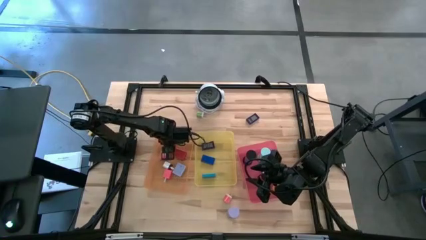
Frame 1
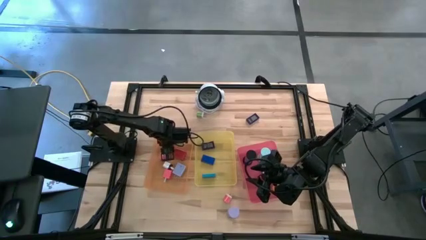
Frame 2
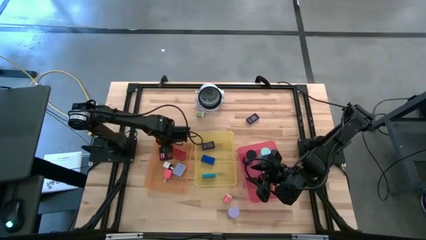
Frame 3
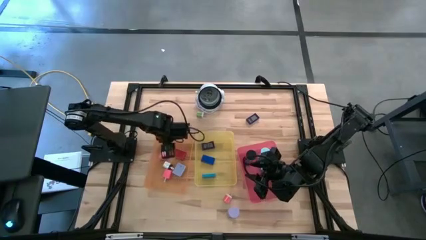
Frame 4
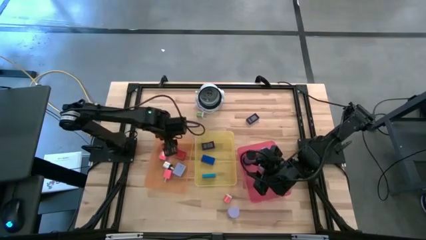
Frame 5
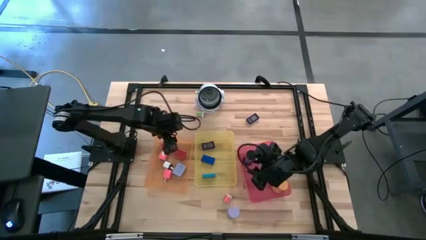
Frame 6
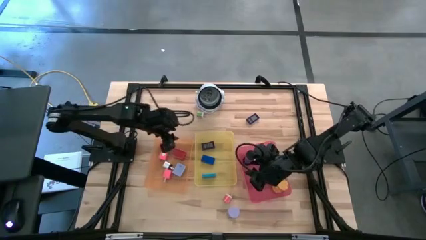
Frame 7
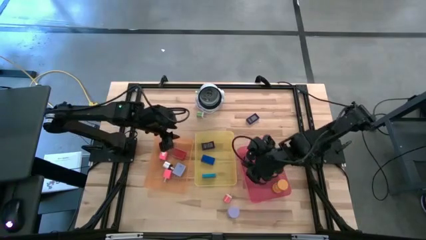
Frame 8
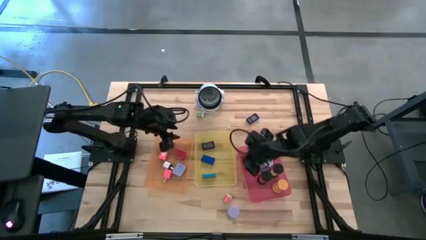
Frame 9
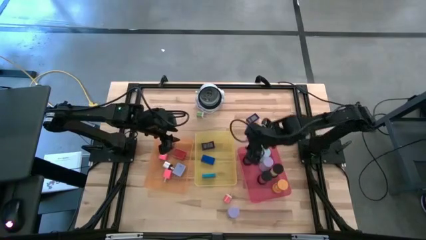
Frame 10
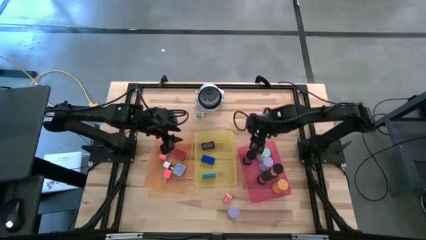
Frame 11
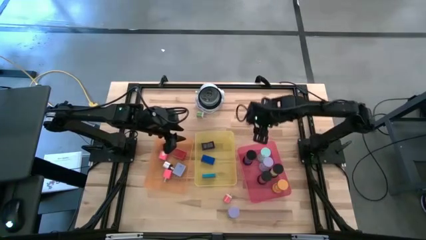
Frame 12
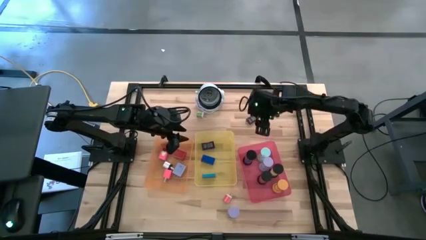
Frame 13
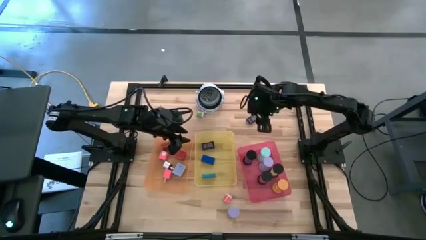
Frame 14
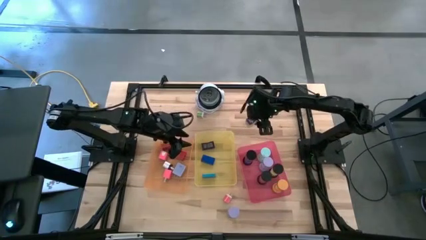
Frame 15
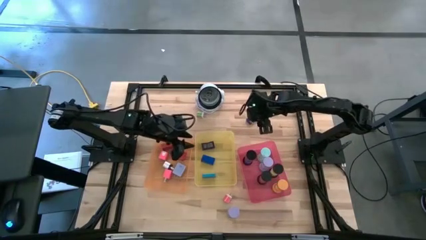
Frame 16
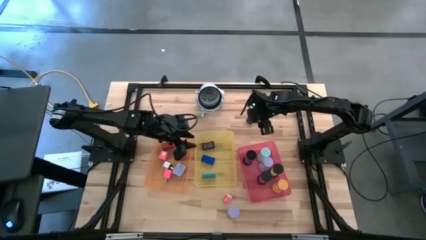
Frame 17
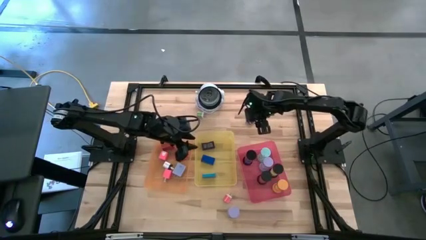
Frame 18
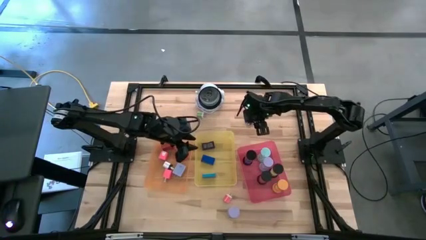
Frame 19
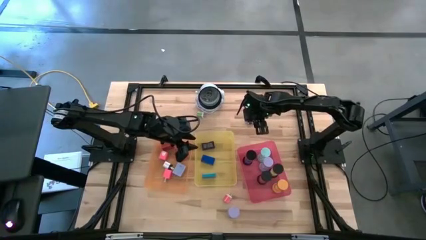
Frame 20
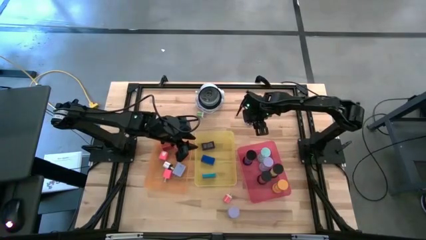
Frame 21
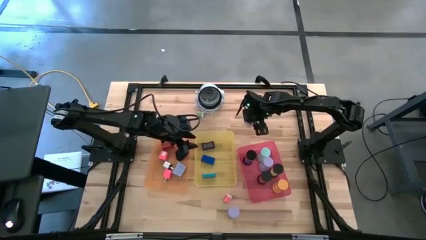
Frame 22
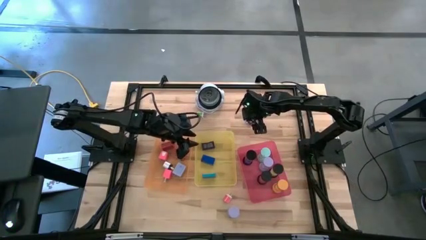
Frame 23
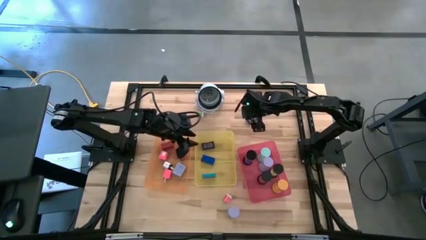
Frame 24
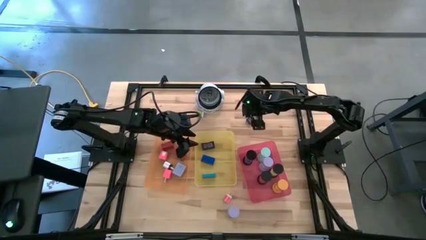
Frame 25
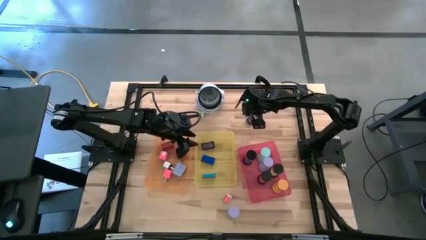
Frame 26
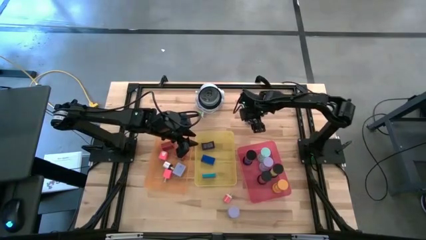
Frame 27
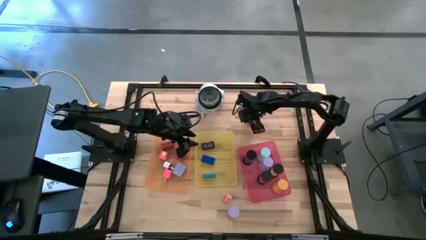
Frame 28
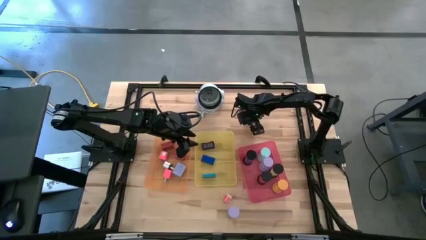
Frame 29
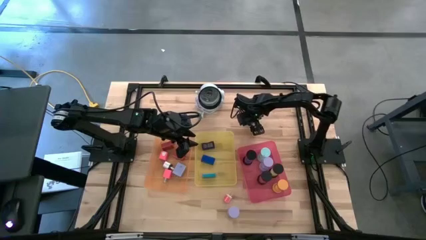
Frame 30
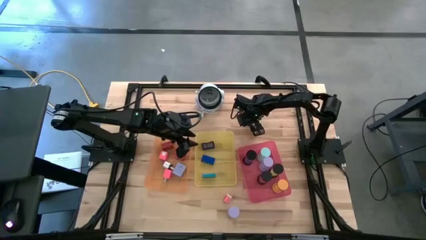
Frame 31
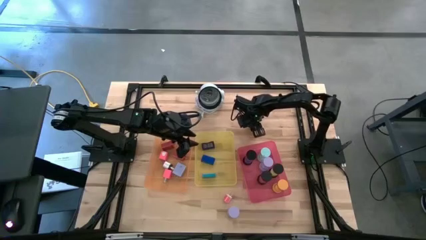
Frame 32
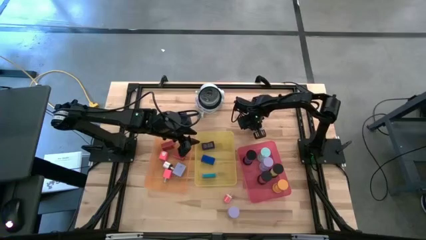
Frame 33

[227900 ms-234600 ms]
Task: Pick & Place Office items
Put the blue digital timer into the yellow bin

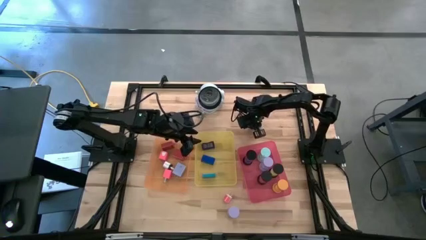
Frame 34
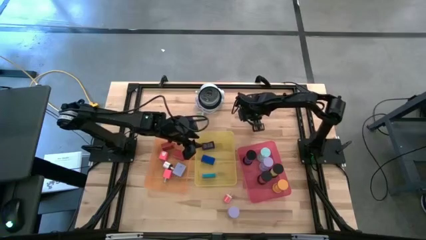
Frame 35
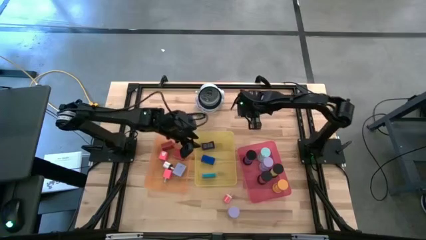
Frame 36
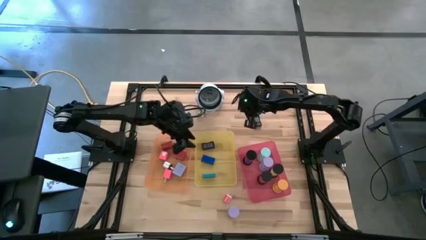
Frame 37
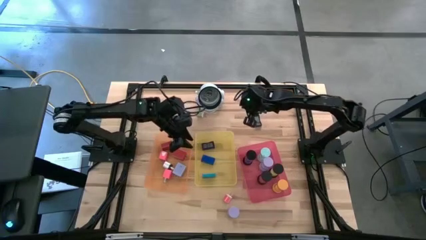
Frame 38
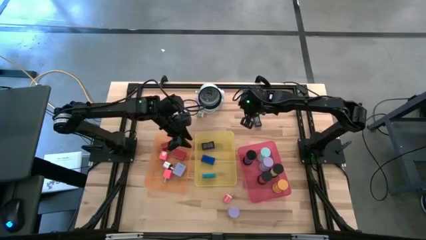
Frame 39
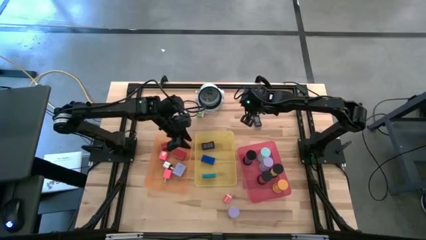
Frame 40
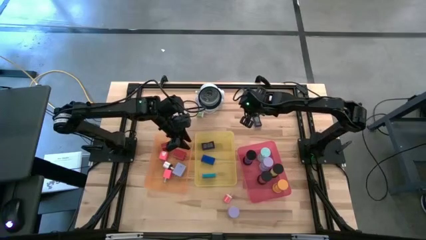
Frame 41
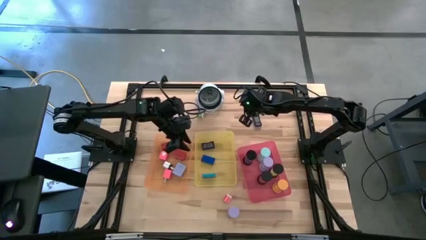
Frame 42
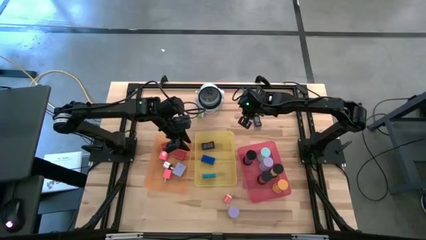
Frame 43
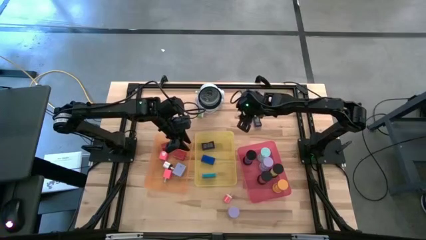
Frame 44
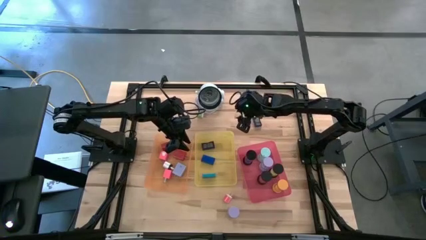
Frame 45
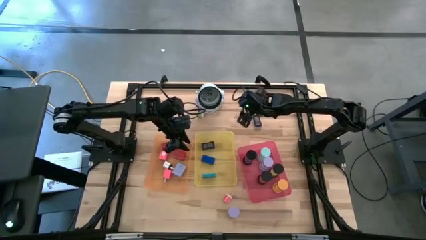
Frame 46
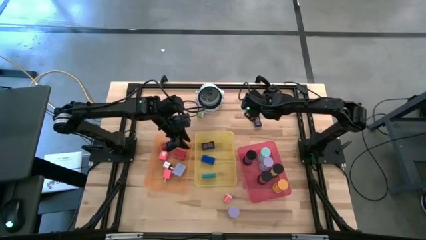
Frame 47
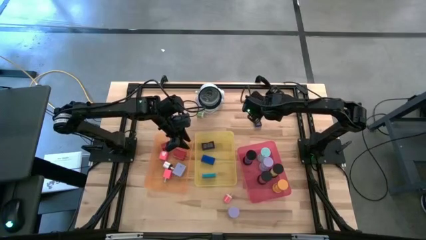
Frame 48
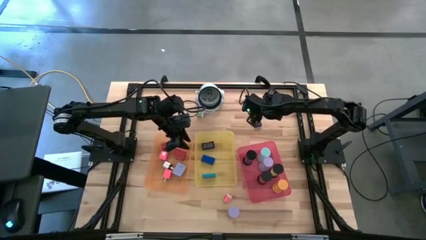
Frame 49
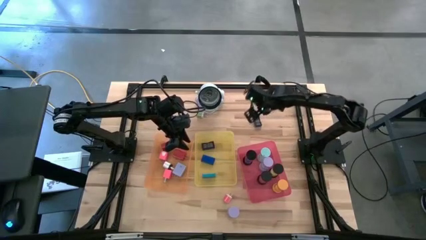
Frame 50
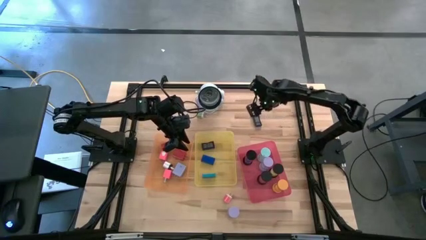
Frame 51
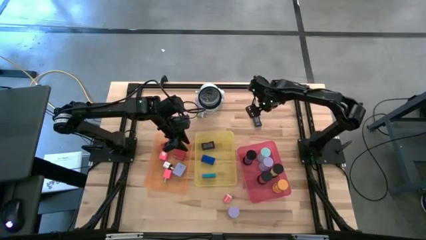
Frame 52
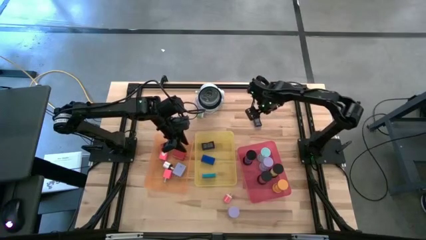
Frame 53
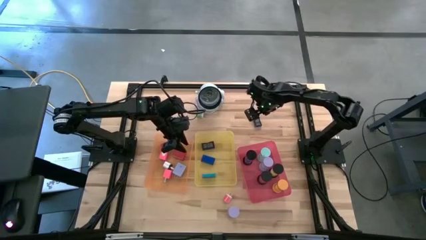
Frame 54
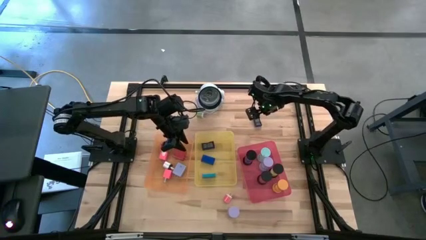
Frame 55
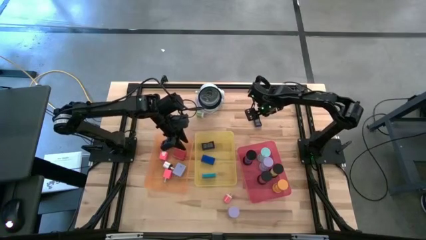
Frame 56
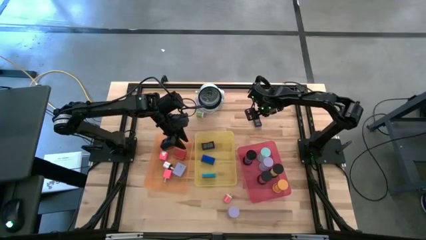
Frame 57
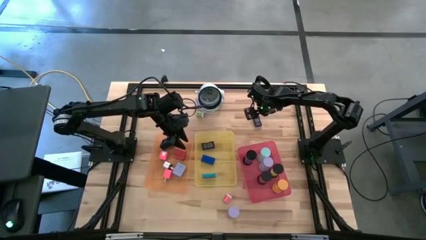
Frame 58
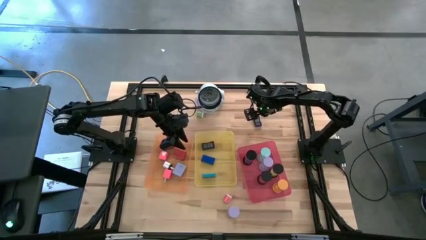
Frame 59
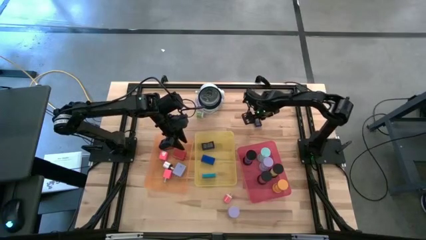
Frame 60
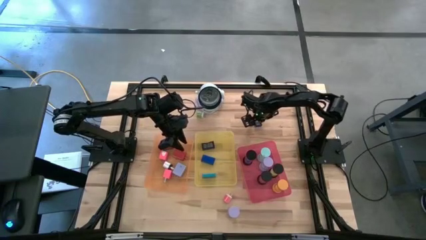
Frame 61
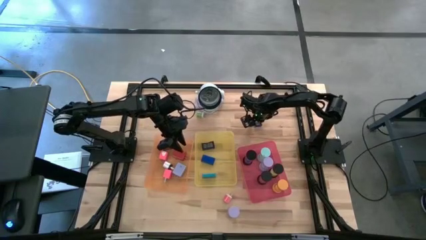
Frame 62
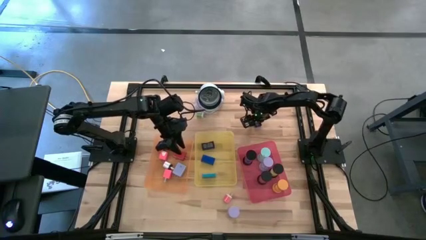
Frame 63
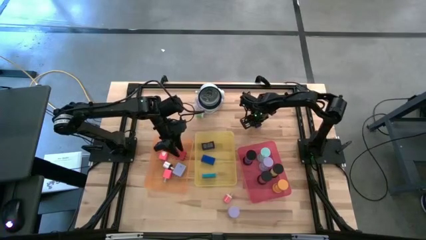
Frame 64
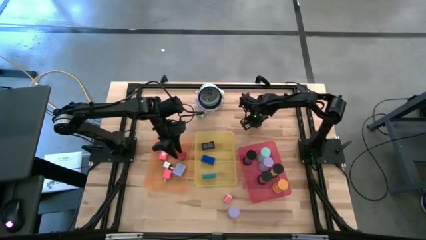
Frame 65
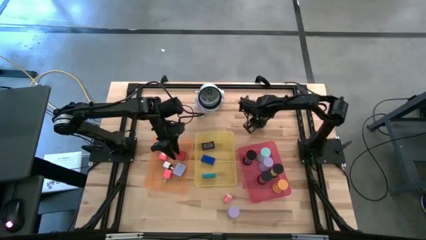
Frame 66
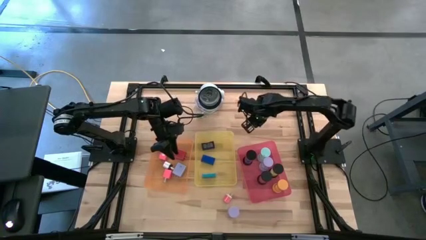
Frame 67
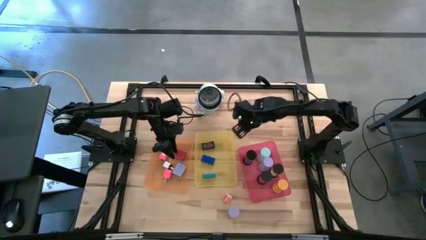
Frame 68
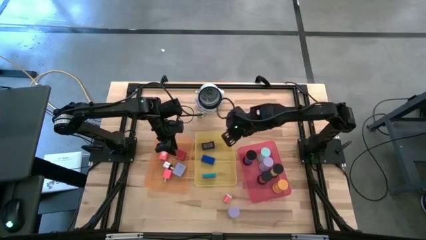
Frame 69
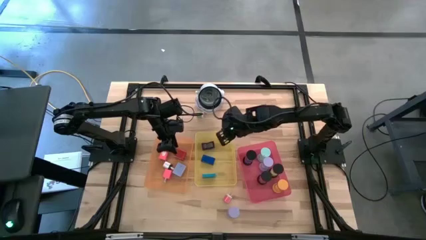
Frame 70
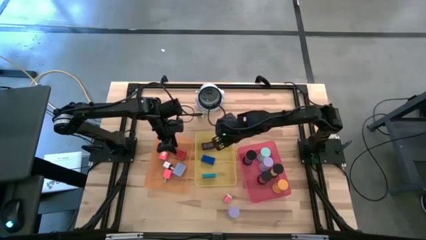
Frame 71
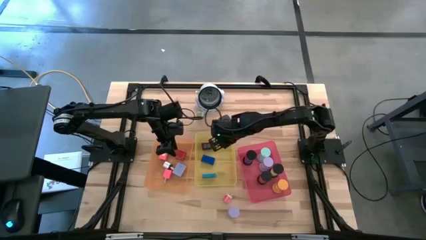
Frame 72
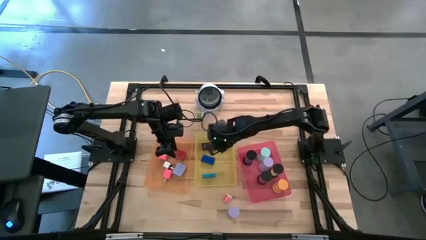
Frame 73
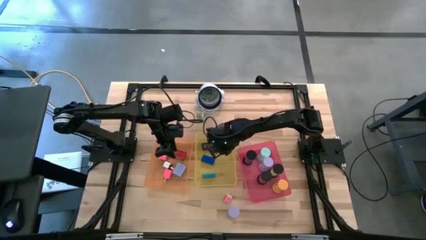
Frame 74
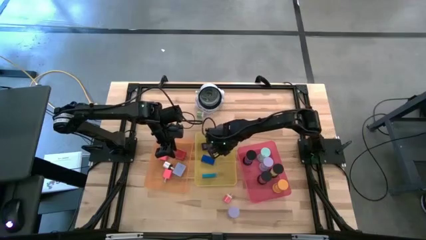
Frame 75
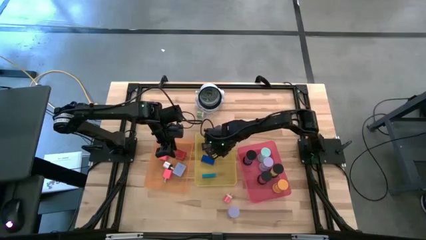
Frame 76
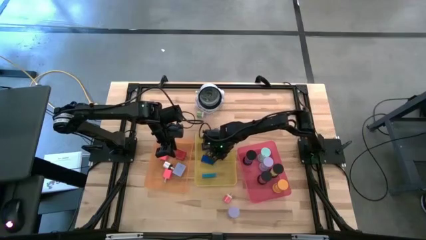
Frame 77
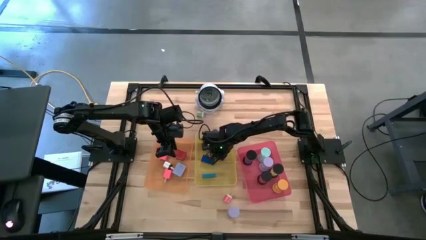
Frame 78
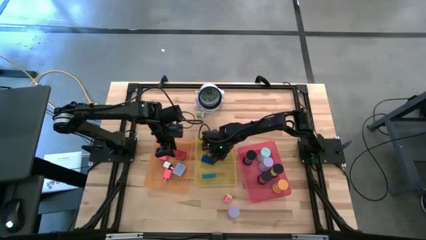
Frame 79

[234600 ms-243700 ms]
Put the blue digital timer into the yellow bin
